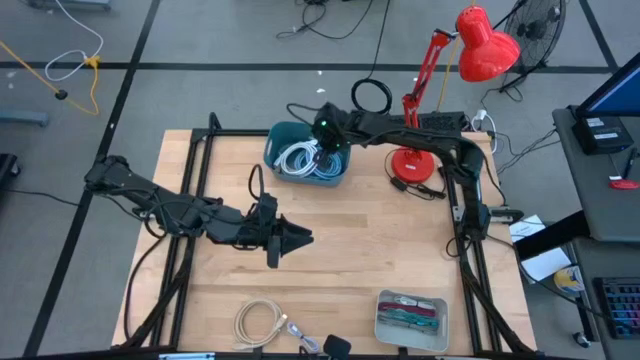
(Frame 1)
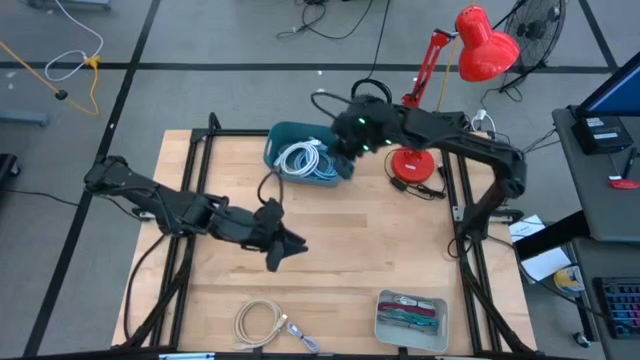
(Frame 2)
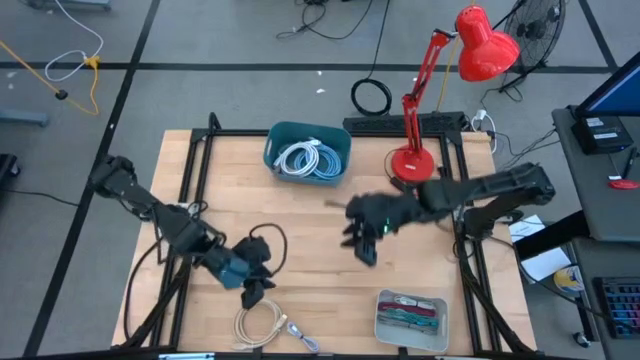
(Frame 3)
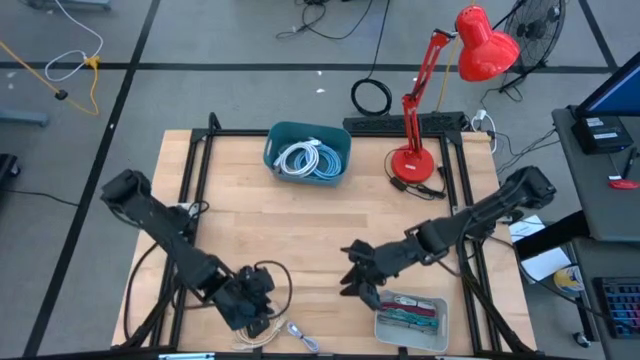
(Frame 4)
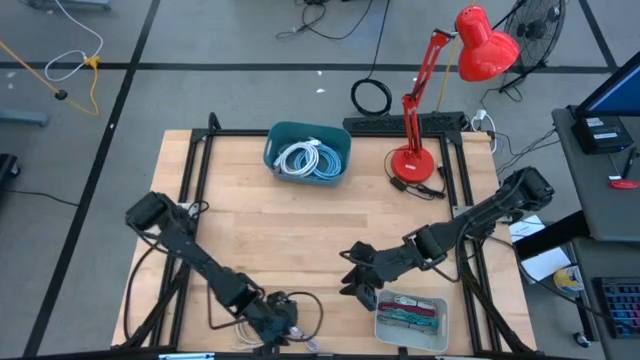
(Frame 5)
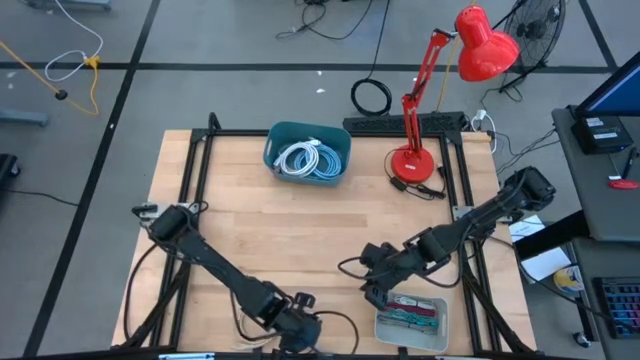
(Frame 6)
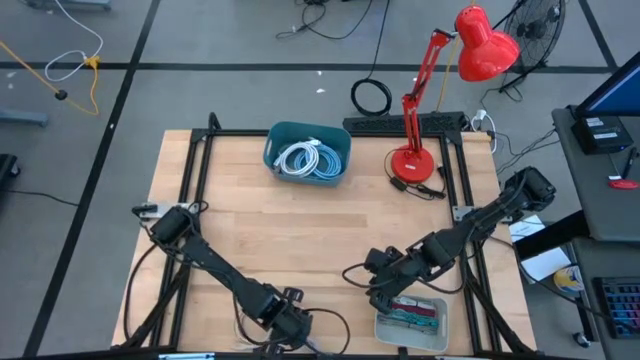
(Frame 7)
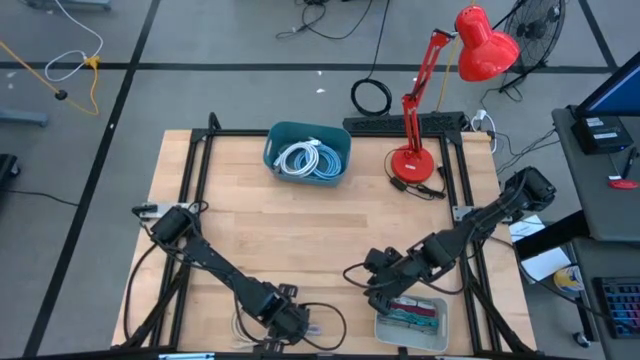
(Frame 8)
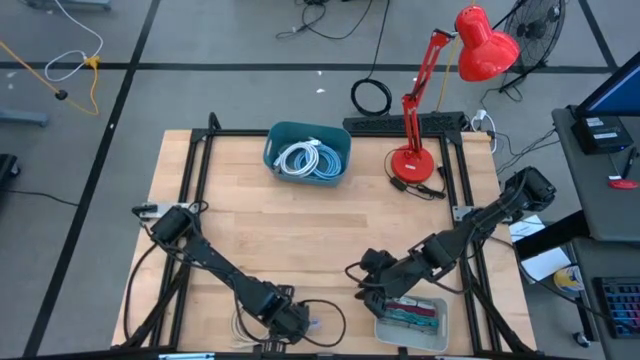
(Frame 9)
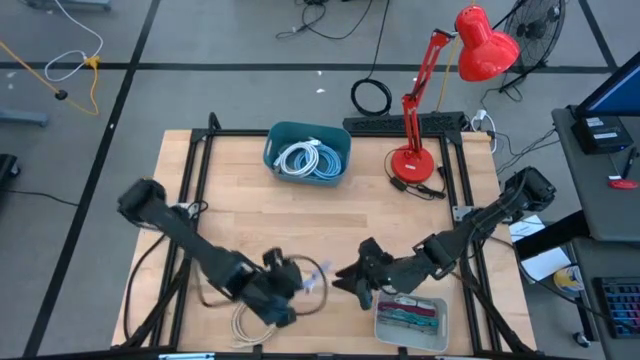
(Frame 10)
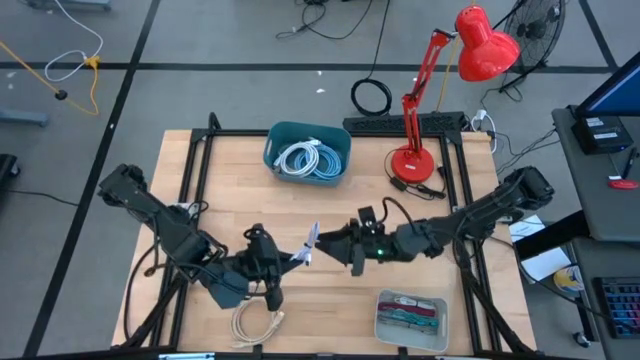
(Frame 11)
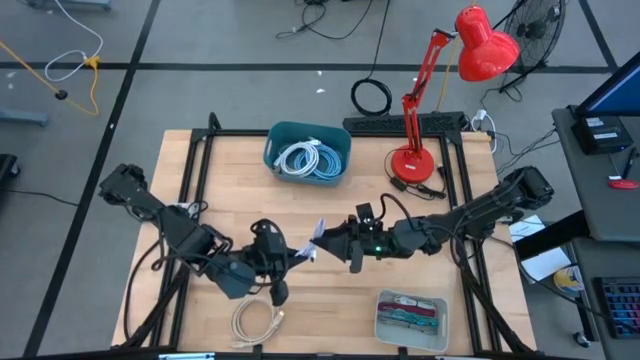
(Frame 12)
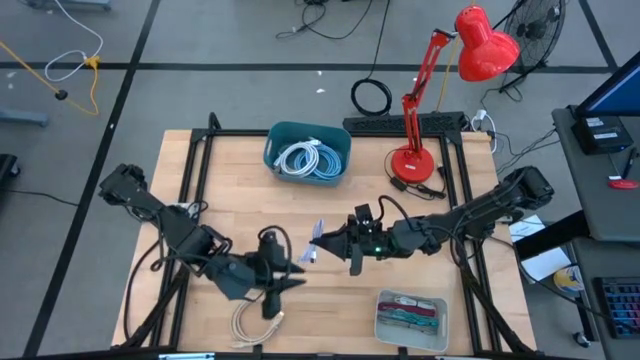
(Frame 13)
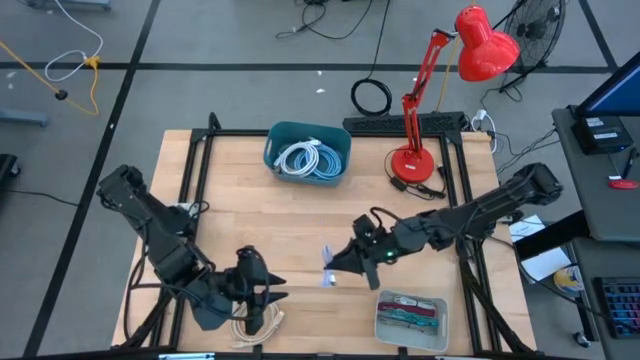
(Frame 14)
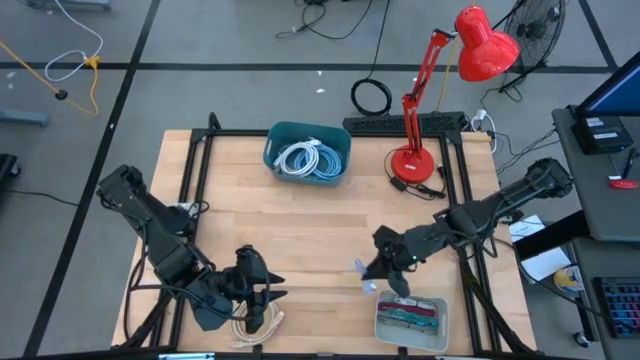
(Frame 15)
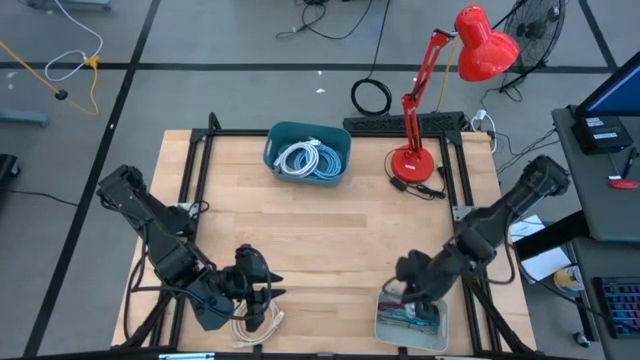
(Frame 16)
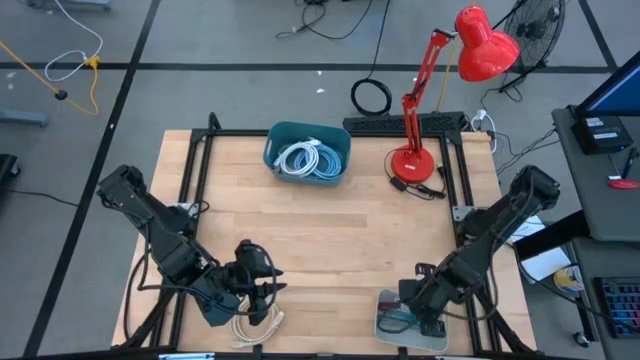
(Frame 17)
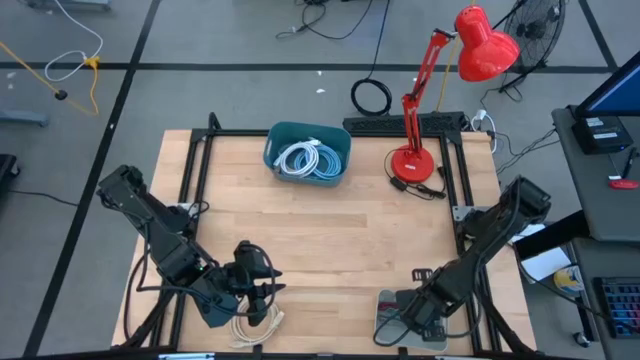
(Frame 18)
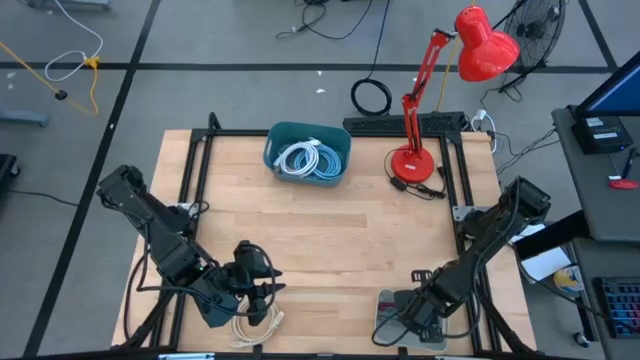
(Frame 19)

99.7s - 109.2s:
Task: Sort cables into bins
Put the purple charger cable into the gray bin

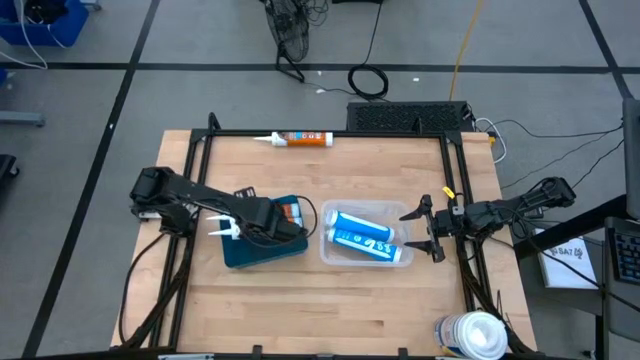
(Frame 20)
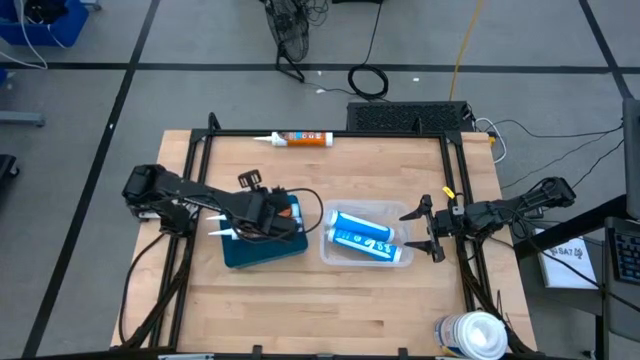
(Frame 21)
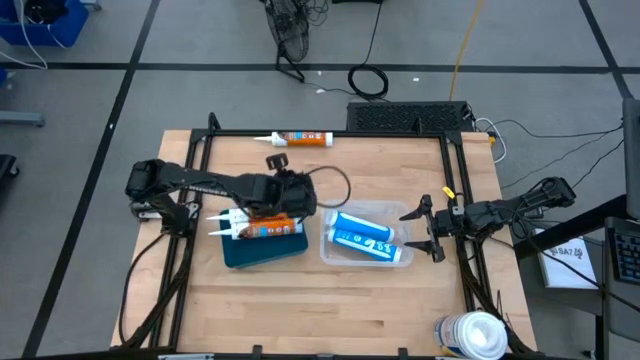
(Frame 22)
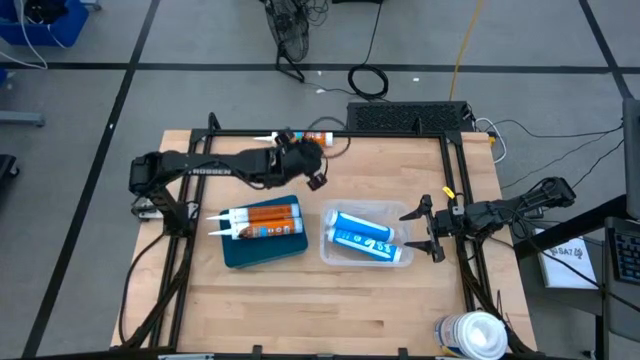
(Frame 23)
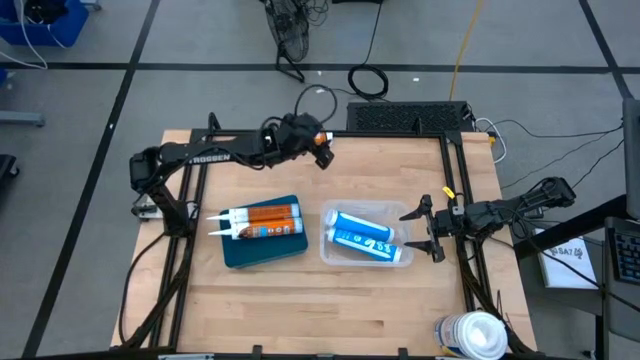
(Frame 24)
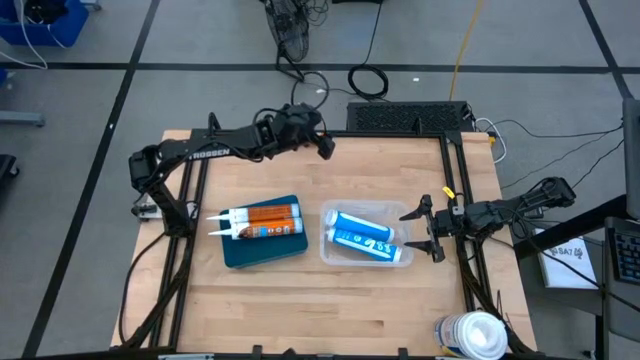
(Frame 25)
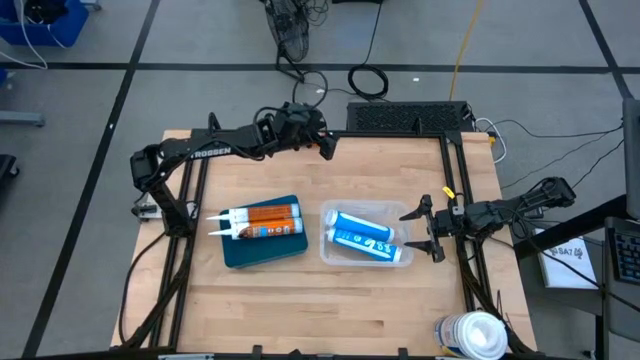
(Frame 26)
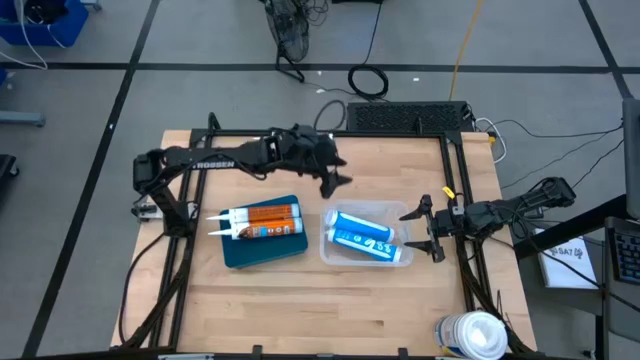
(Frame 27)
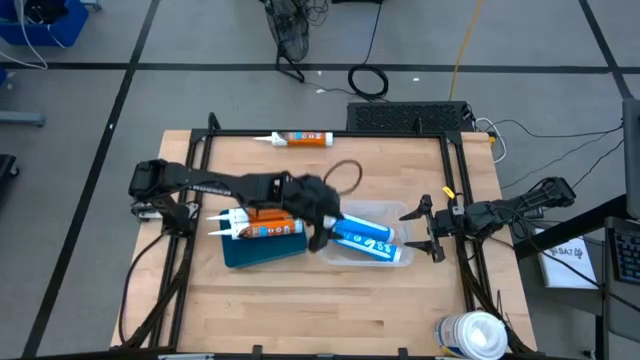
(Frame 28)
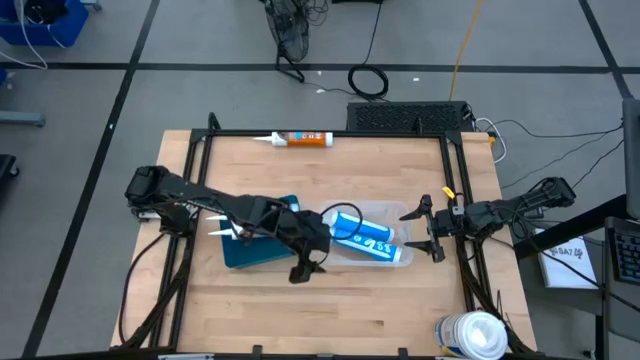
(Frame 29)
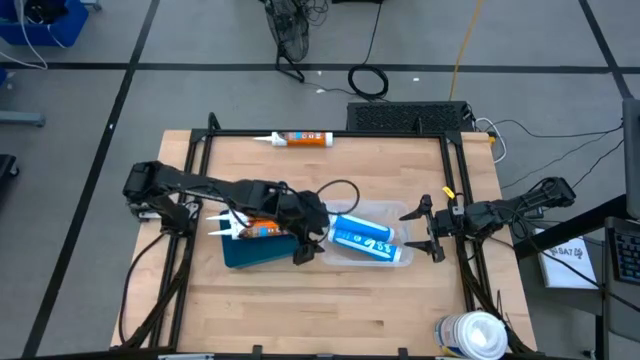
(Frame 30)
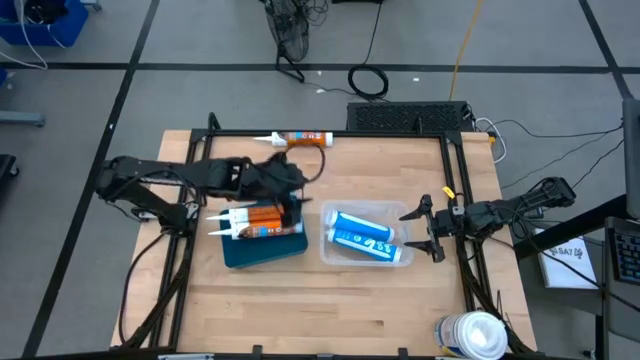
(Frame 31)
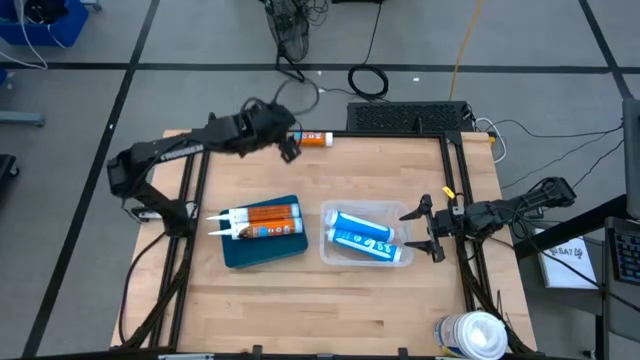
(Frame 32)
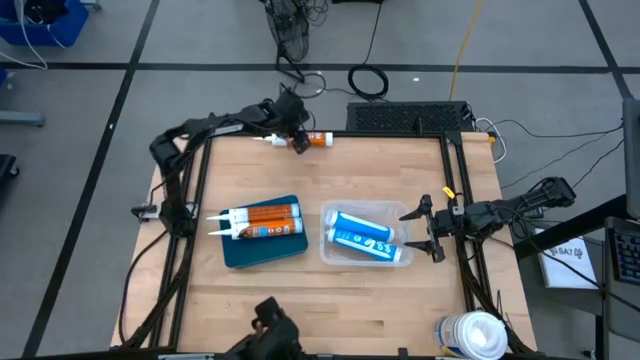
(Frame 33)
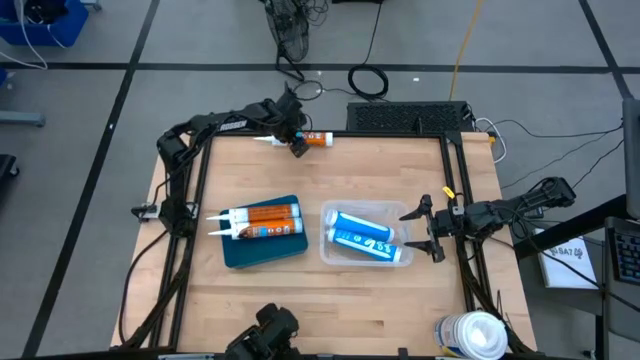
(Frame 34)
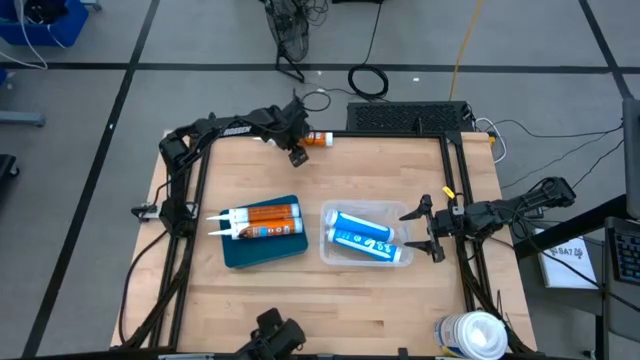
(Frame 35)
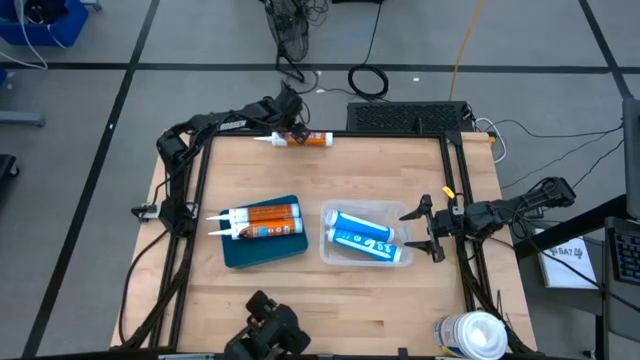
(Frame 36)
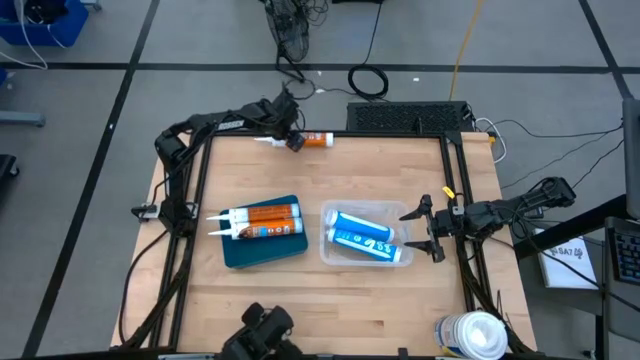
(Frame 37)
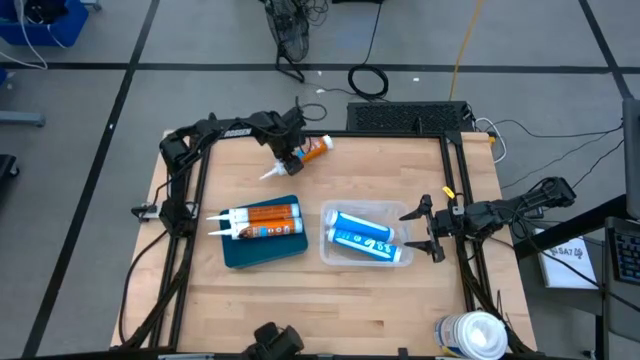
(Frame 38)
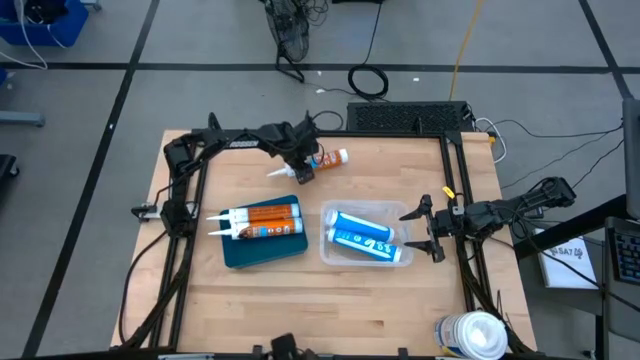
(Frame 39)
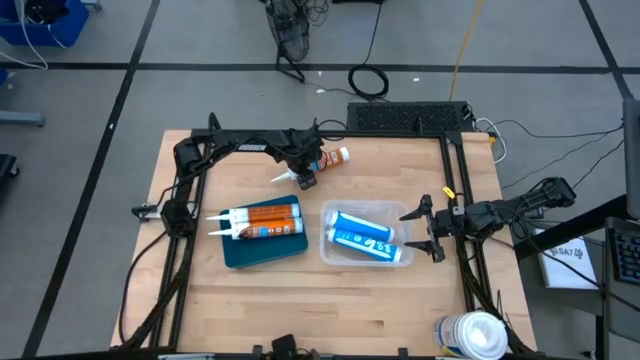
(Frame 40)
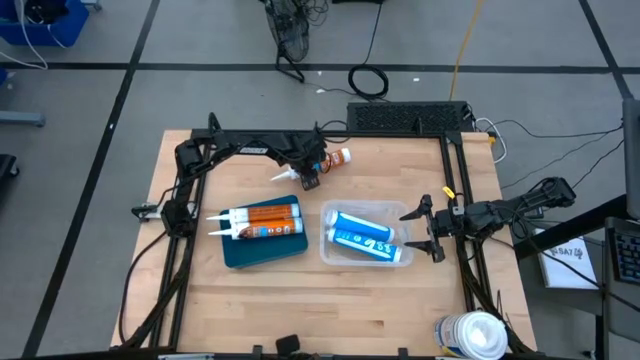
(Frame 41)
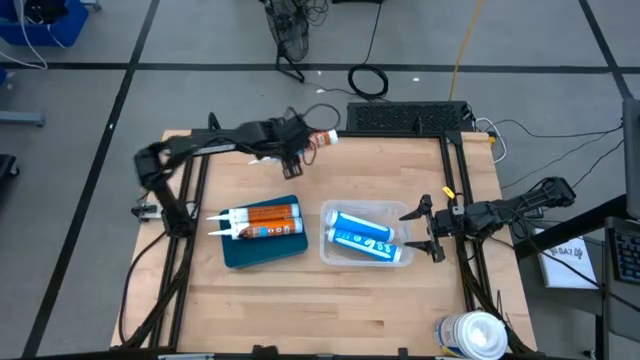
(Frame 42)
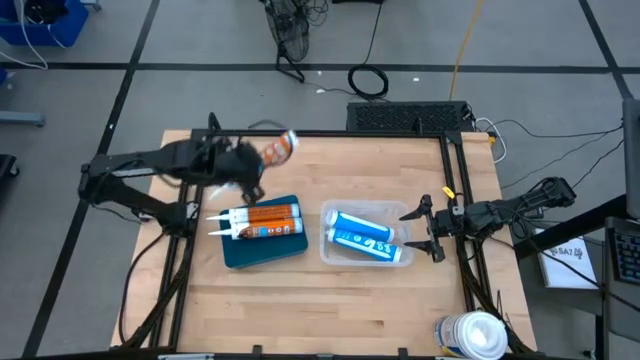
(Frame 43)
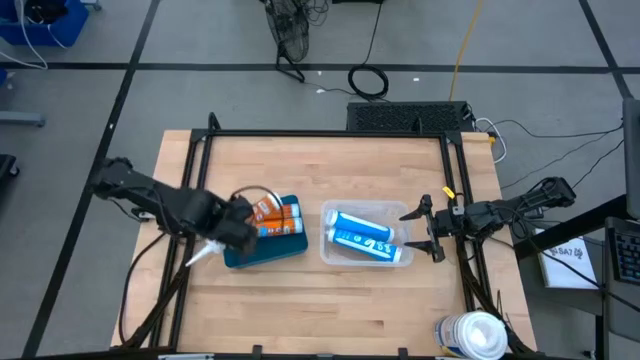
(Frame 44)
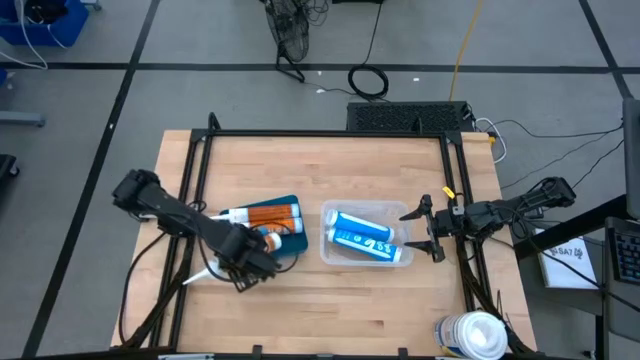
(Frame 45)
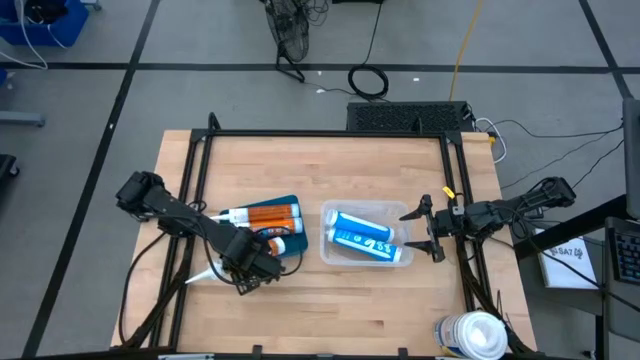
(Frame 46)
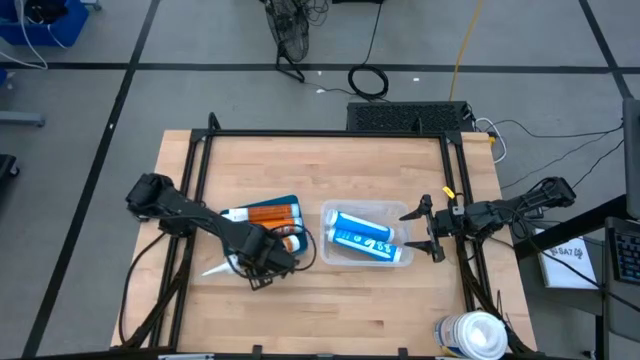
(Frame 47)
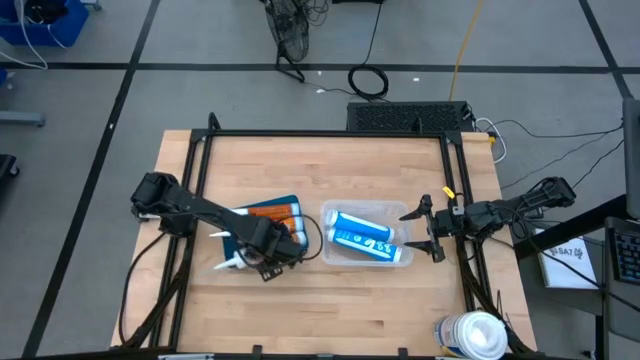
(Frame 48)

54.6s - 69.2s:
Task: Pick & place silicon tubes, Sealant and Lysol wipes
Put the orange sealant bottle into the blue bin
